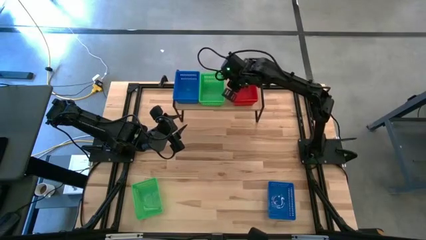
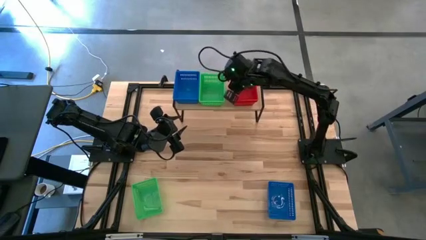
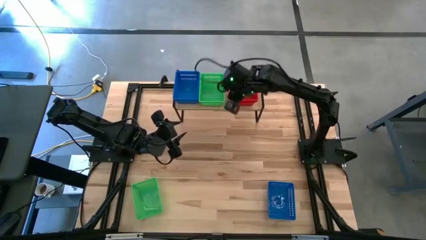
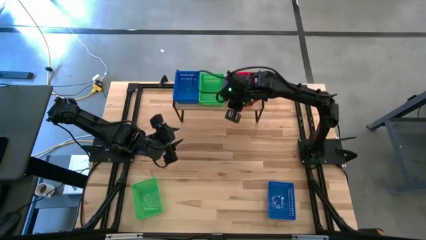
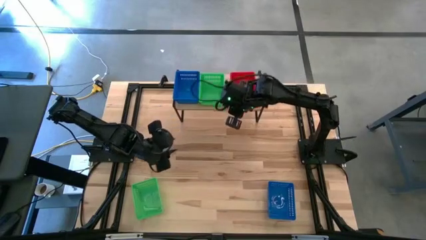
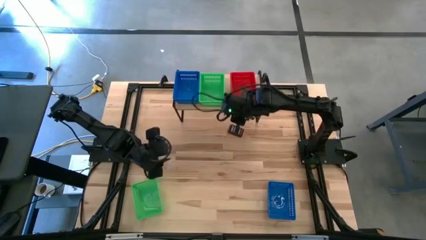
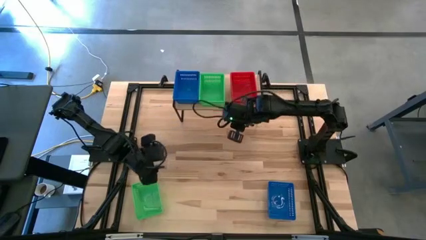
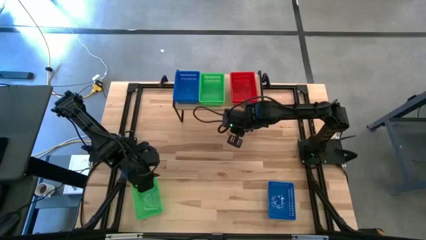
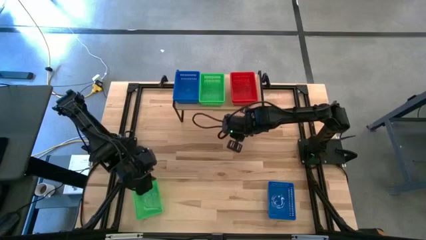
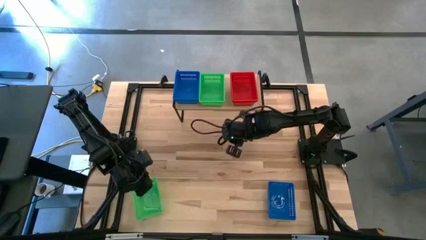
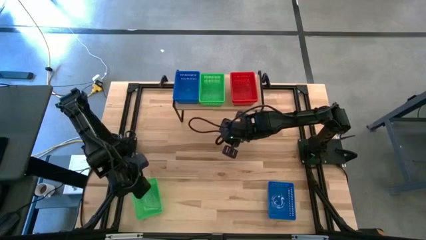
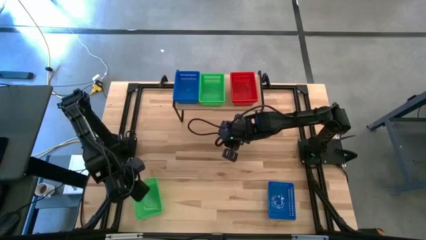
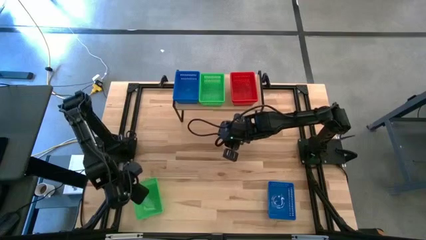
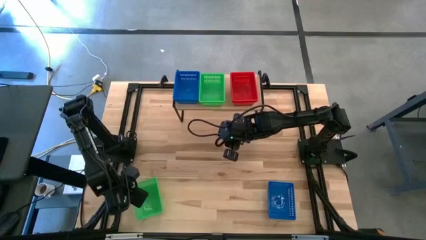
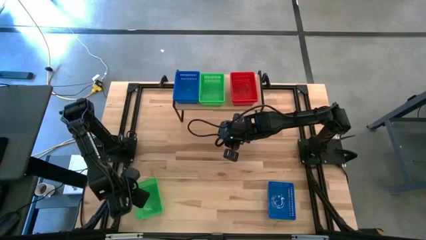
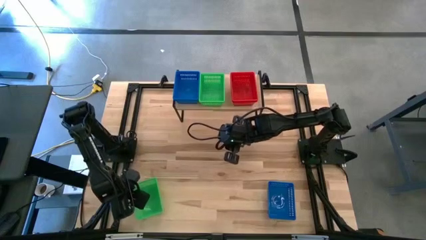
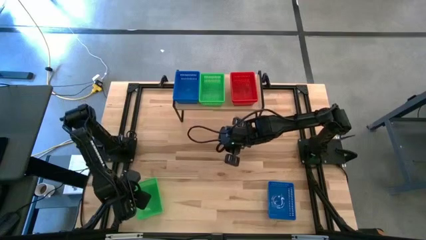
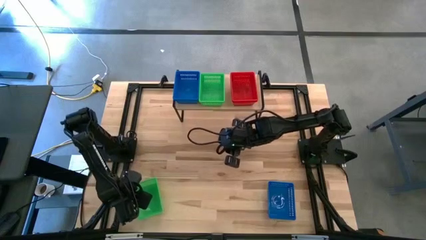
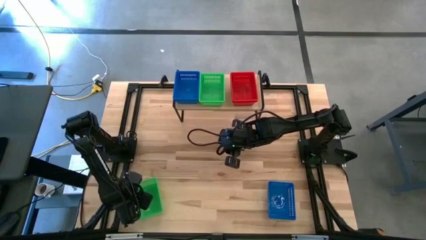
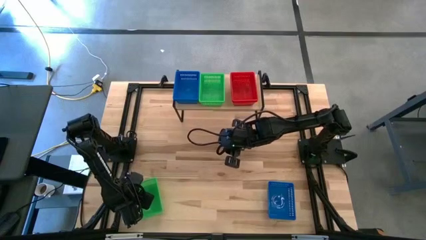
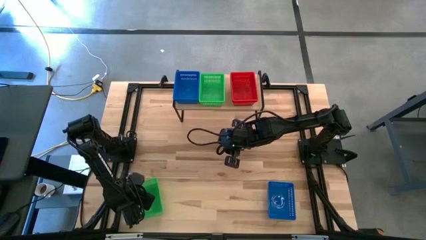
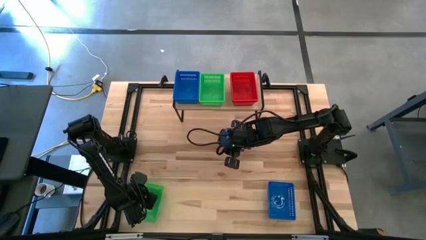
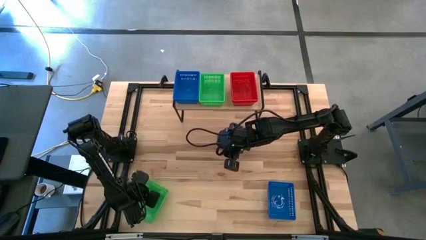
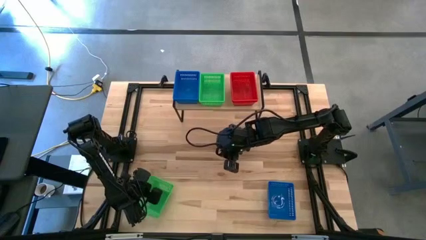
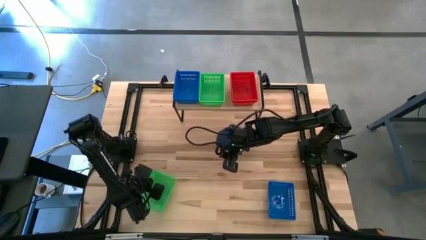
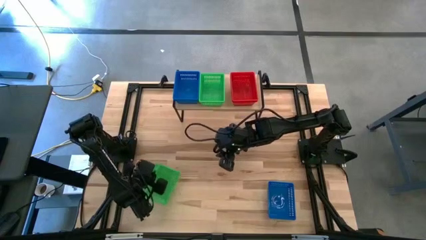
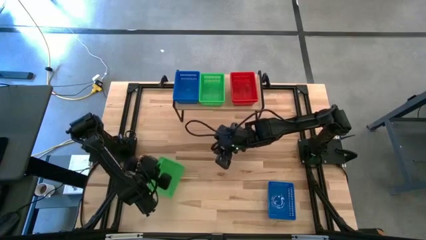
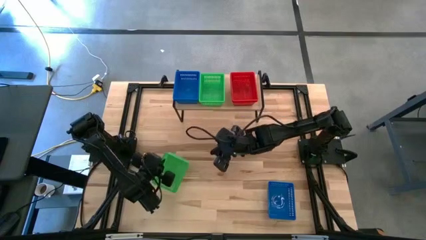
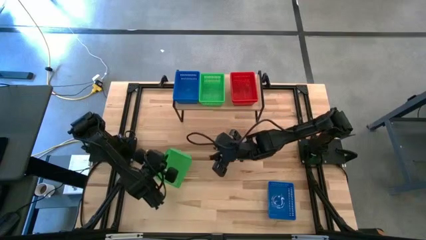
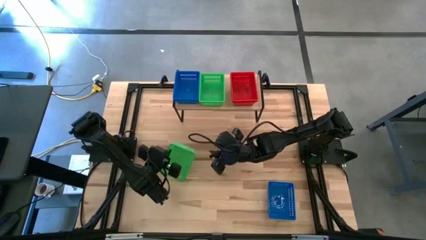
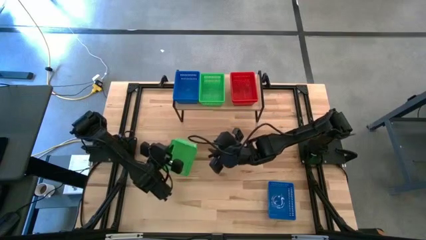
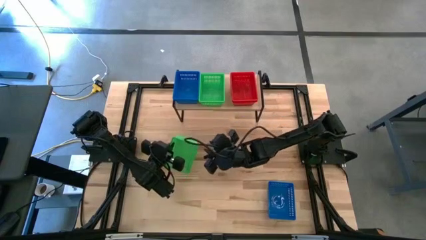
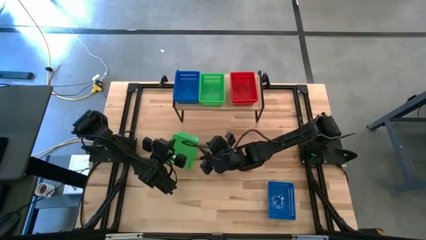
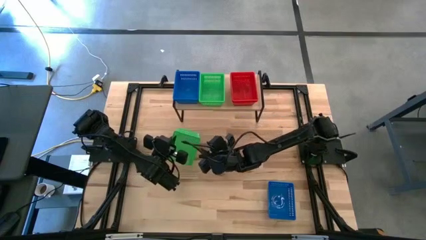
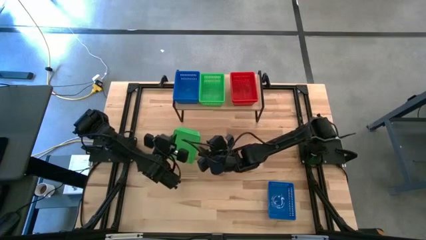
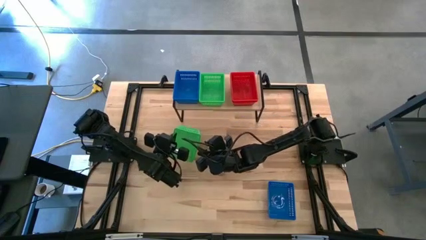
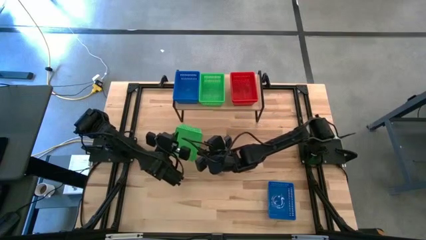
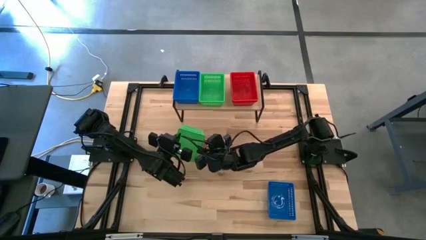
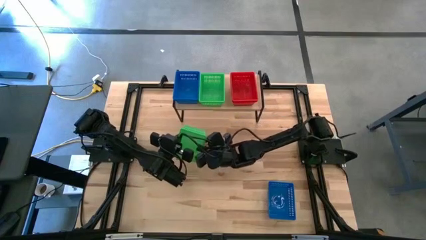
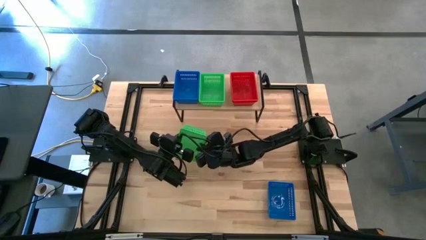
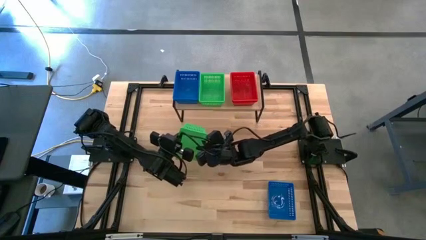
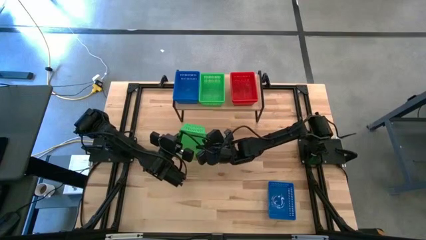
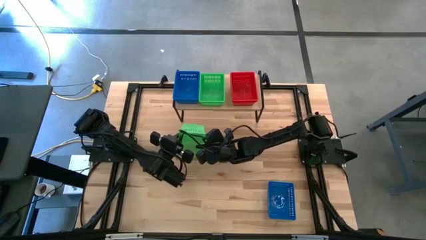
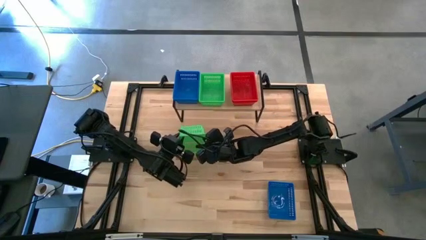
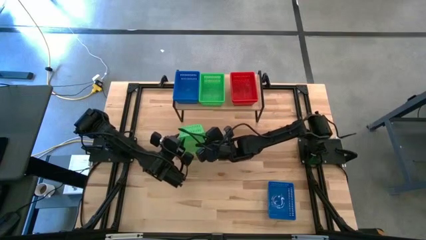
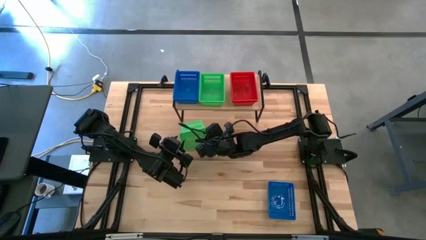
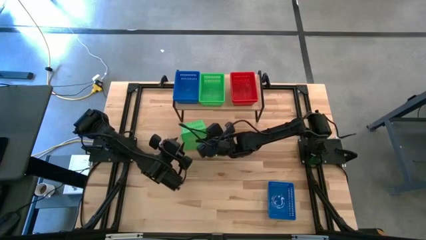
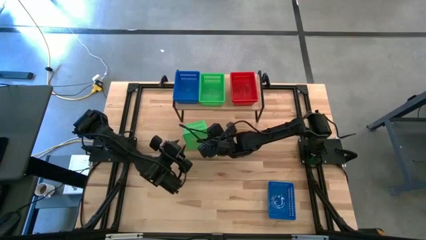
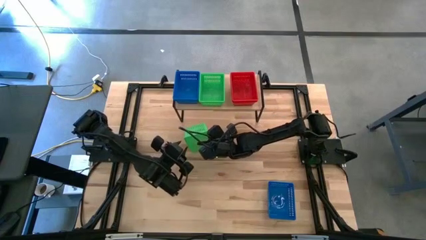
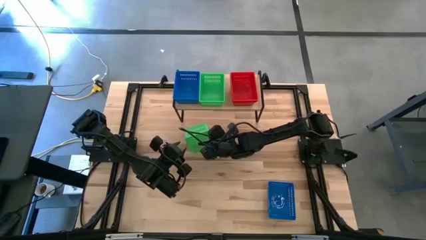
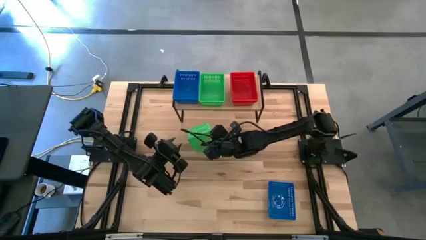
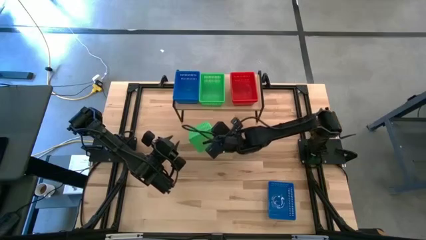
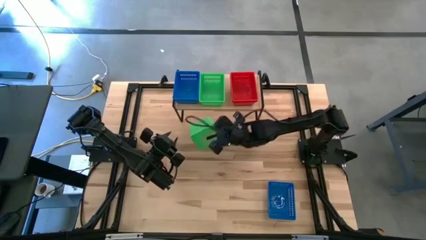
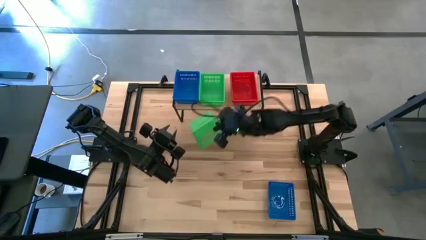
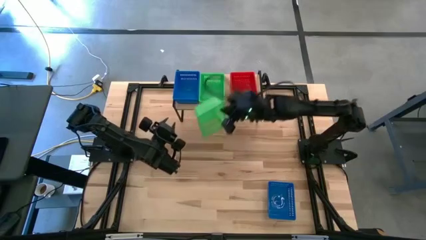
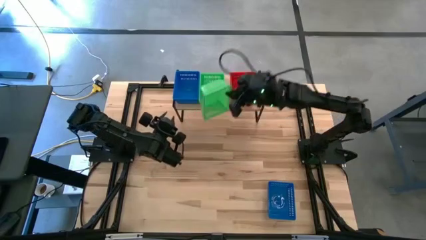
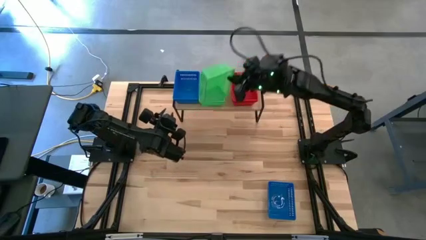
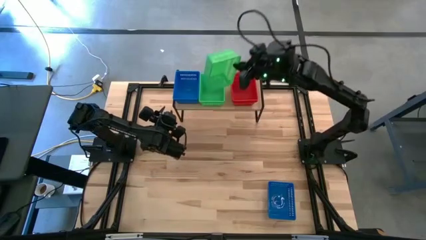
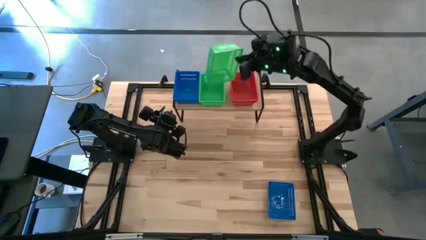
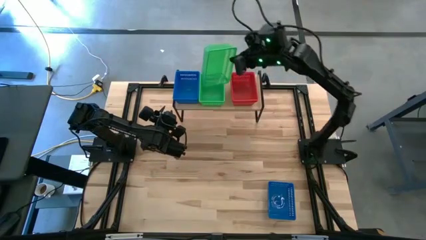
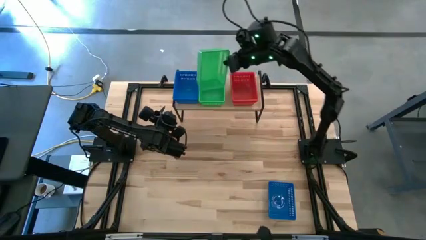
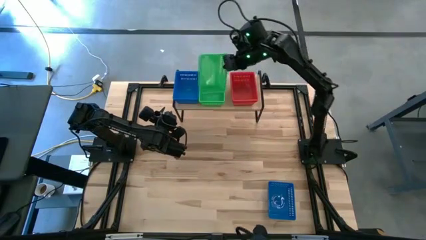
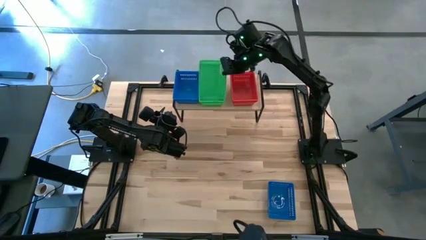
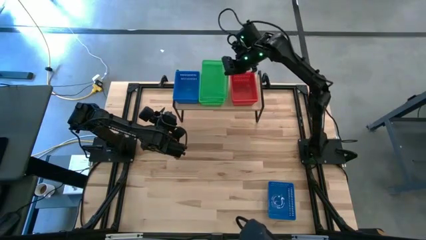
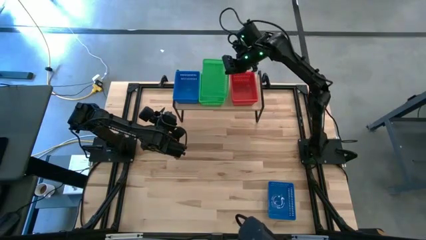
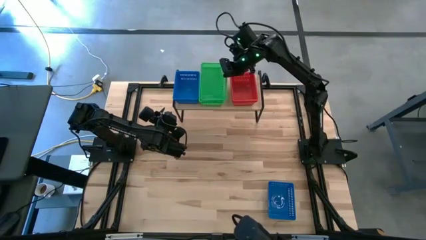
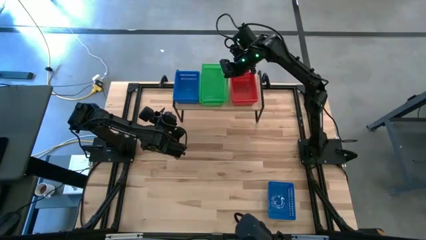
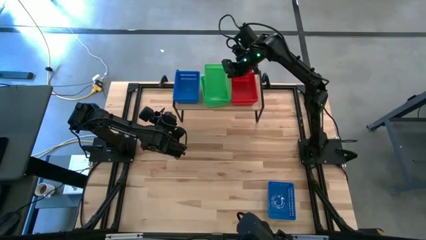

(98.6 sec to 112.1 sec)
Task: Stack baskets on shelf by color
Stack the green bin on top of the green bin on the shelf

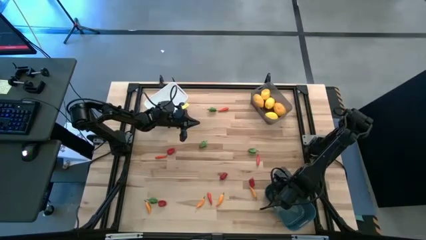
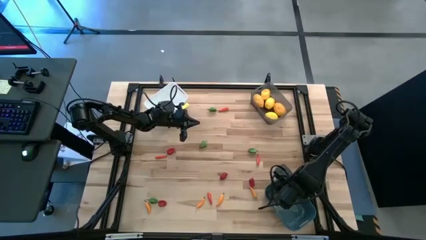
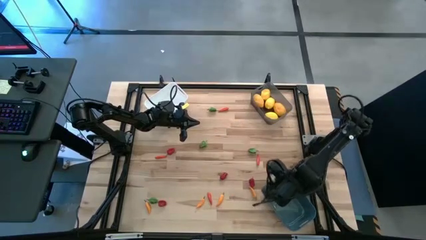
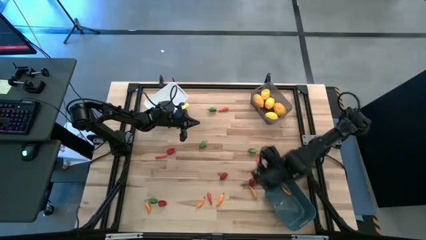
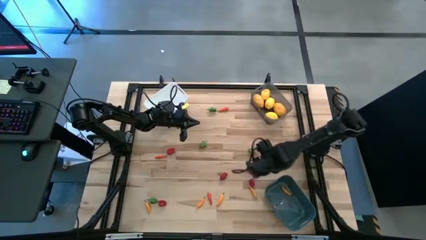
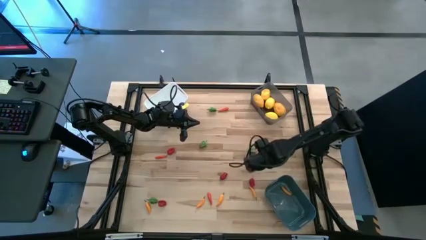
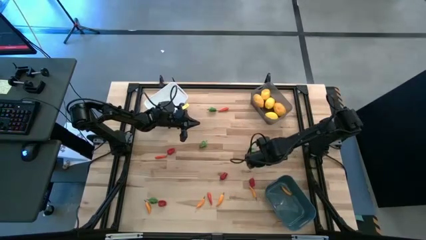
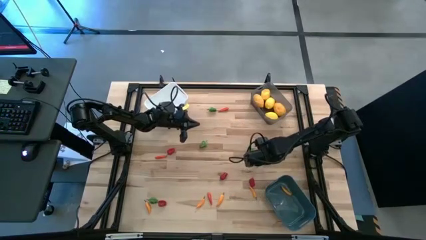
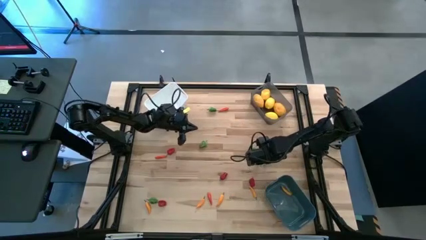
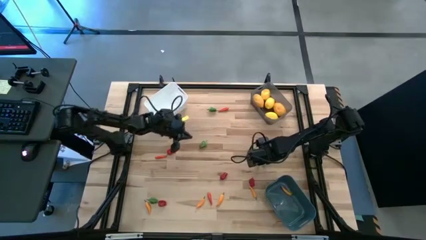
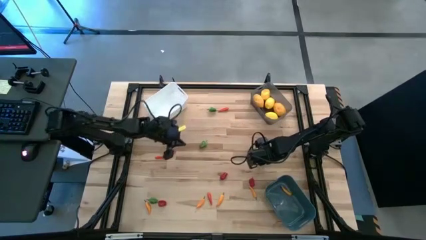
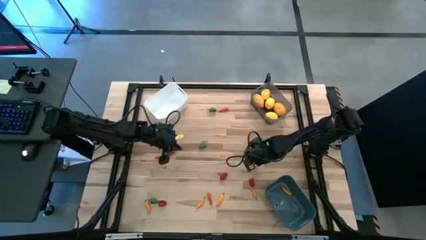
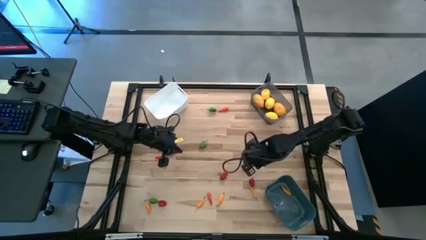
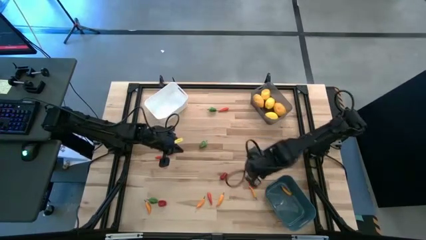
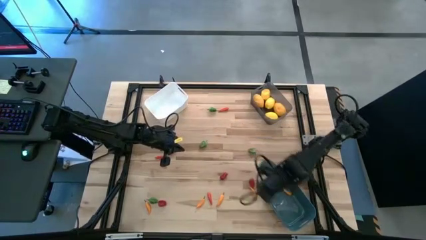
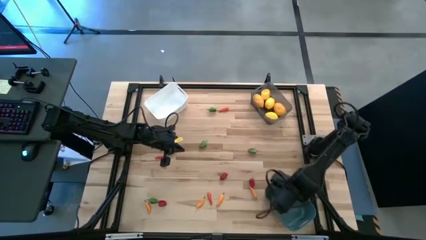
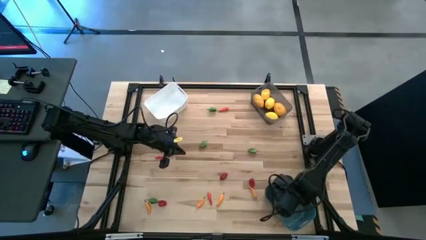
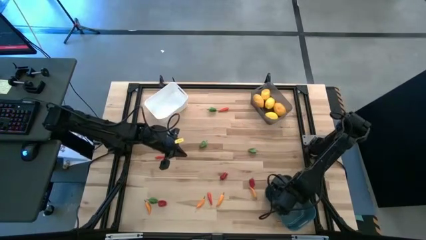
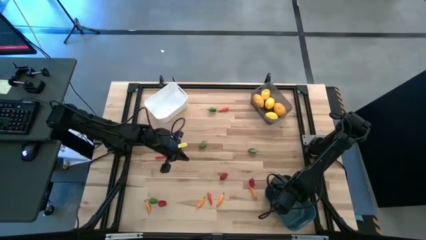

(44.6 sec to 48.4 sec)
Task: Sort produce into baskets
Put the orange chili pepper into the blue bin
